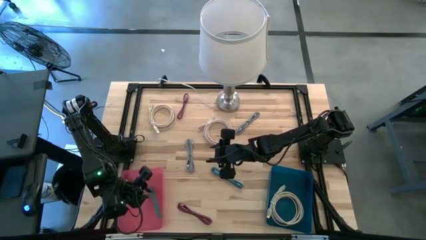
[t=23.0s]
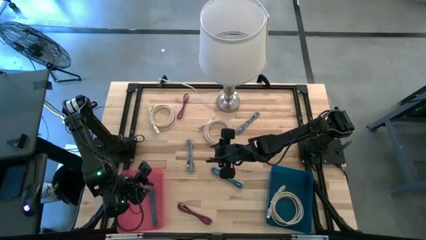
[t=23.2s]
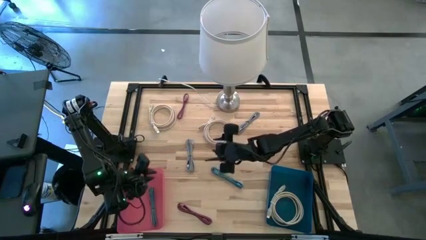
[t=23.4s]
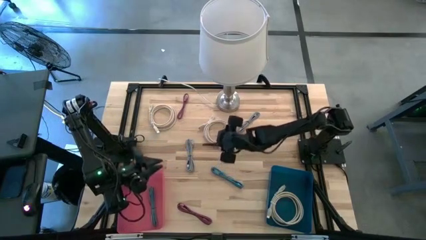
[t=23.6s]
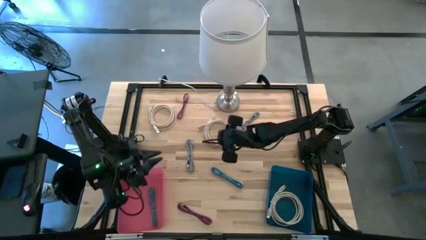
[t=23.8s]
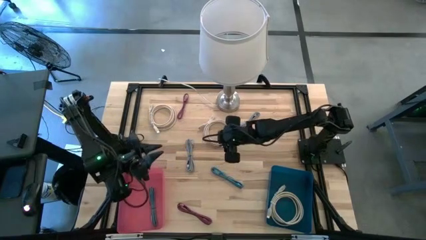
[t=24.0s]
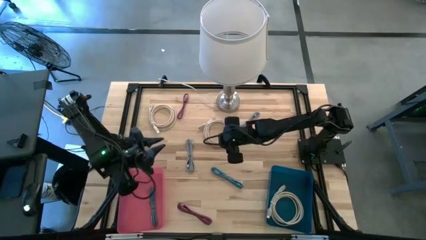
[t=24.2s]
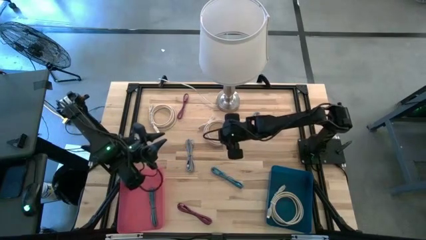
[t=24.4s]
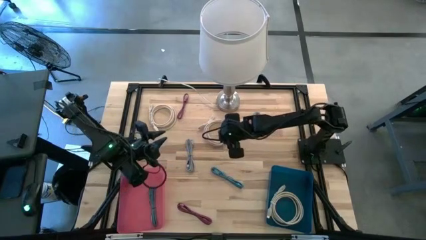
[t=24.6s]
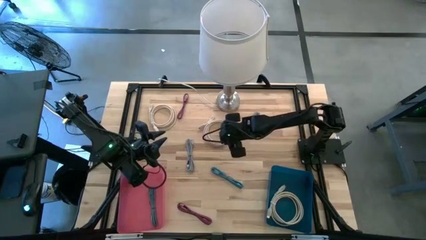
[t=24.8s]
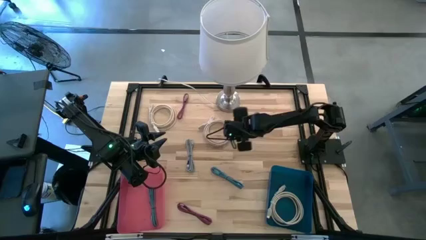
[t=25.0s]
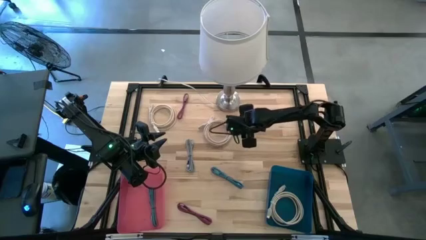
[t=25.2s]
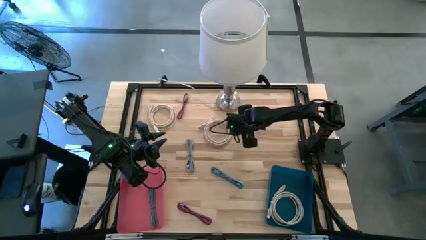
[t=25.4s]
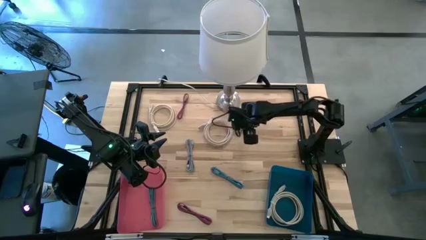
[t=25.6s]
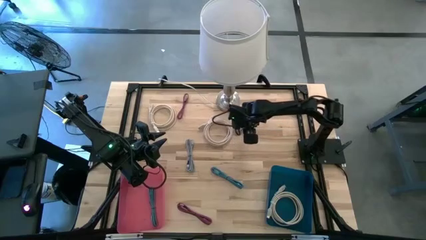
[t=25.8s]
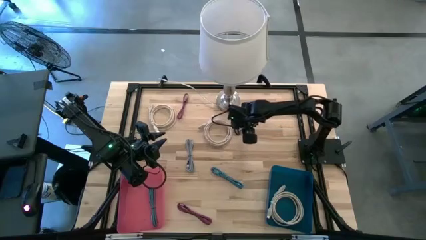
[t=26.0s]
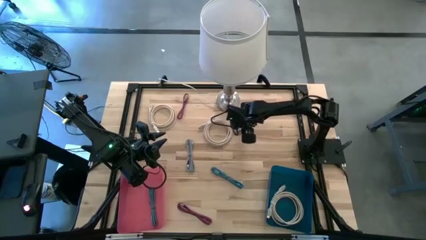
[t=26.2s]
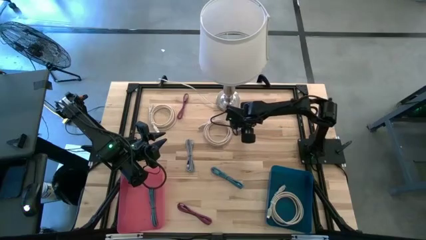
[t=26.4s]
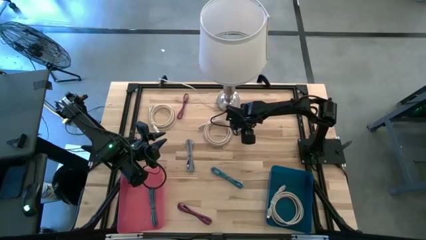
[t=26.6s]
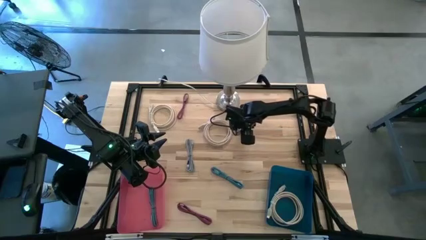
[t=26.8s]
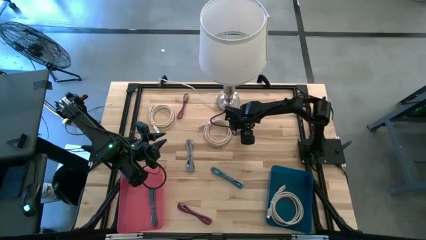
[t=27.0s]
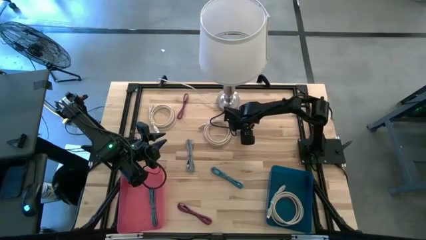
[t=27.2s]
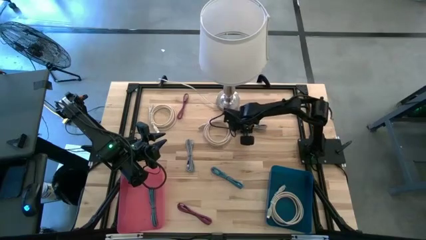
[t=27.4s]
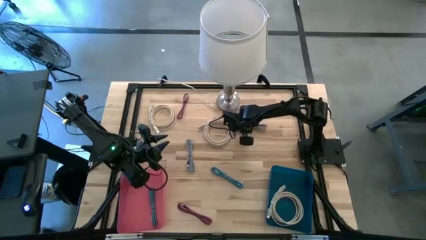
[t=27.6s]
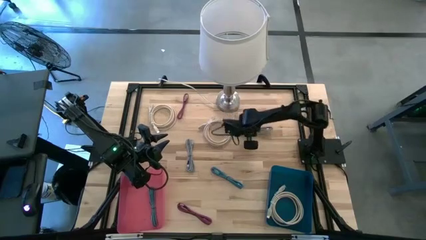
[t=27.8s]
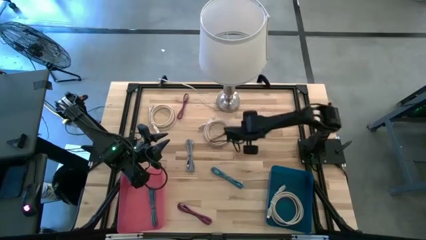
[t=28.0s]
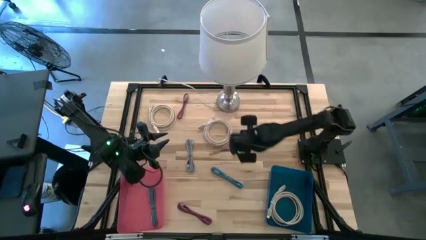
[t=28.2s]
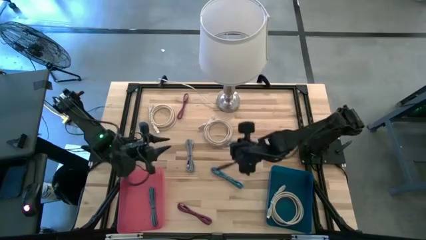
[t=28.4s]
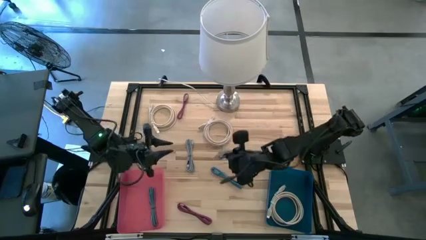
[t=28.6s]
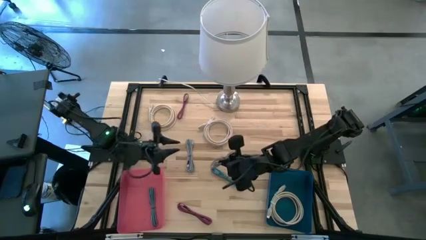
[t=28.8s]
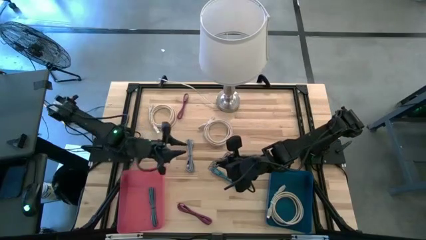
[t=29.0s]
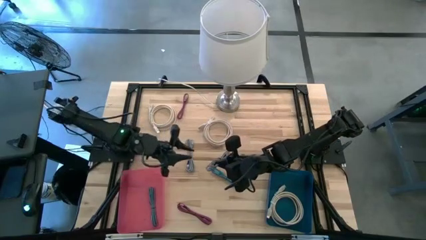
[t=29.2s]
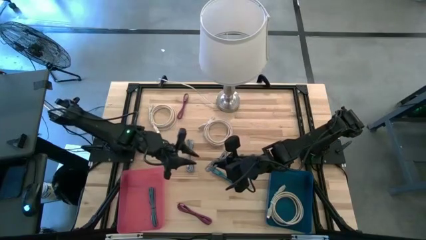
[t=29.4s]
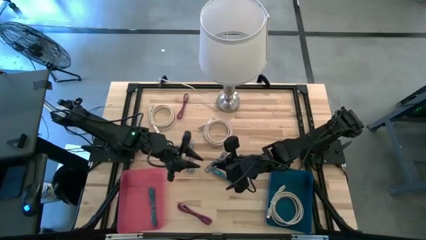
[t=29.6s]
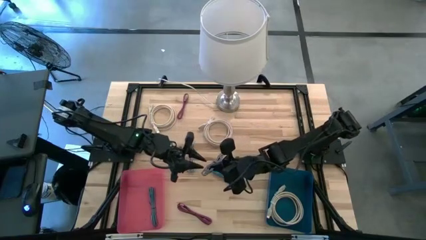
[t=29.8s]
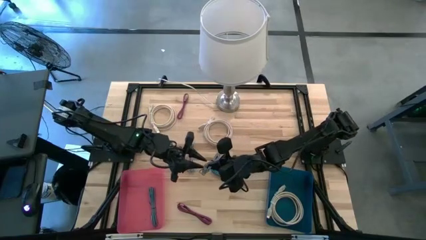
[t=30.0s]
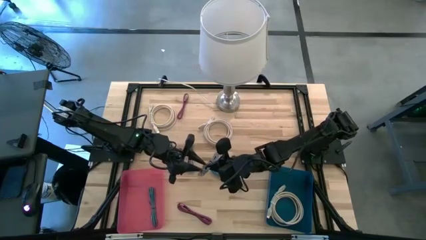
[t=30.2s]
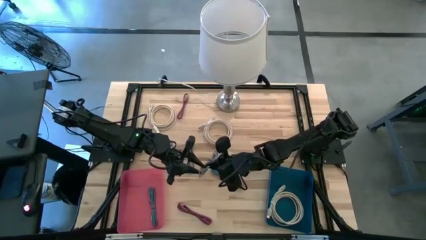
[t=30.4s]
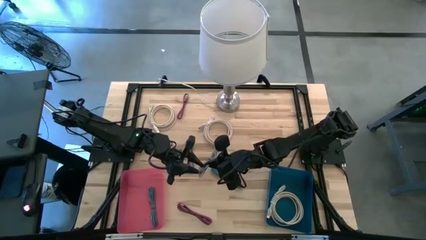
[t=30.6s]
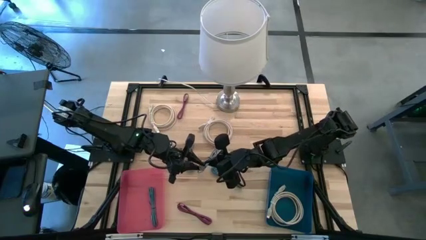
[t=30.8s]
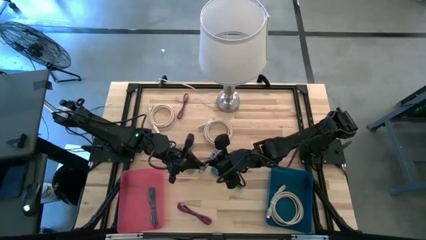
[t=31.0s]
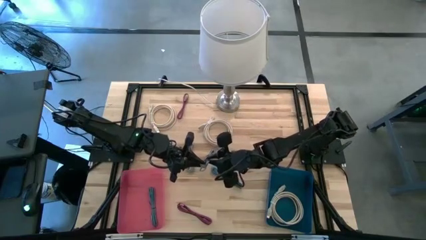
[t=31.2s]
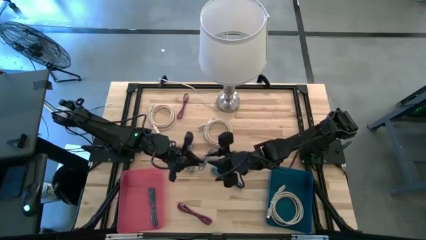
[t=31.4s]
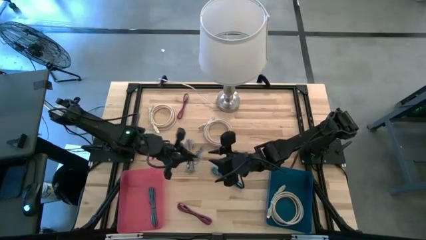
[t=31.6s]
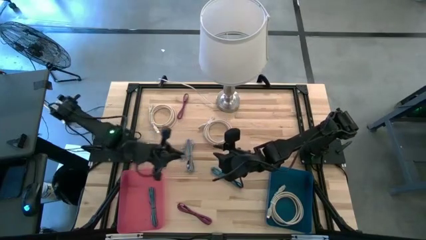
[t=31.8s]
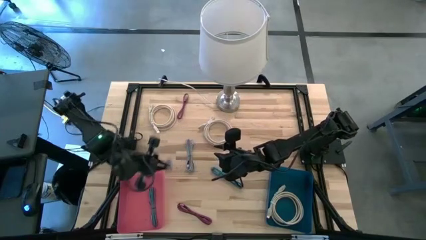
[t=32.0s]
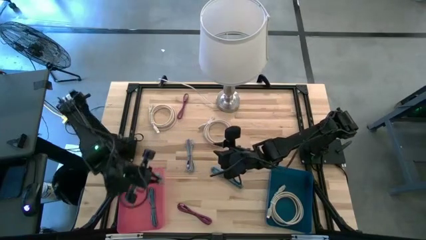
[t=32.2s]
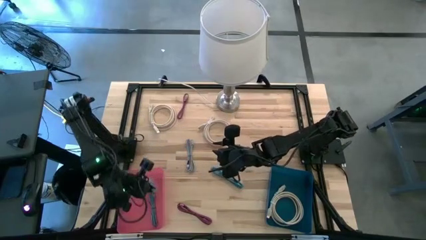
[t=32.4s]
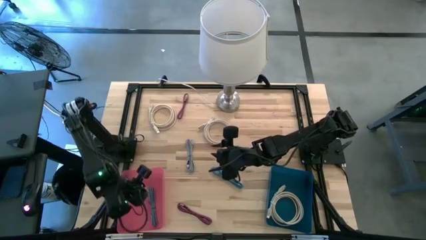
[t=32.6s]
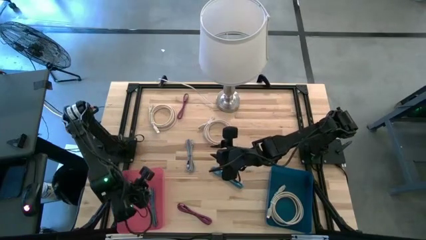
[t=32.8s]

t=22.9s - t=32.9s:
Task: Pick & Place USB Port
Put the right white and black USB cable into the pink bin

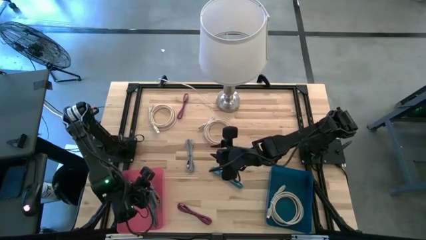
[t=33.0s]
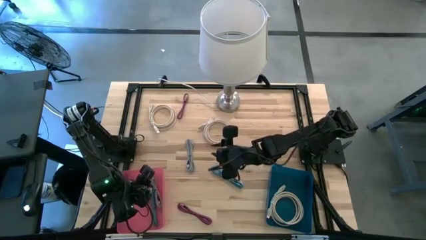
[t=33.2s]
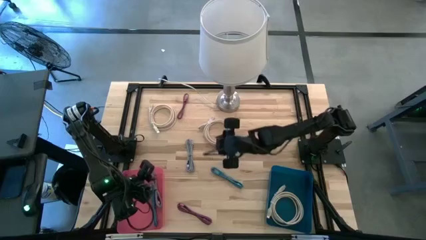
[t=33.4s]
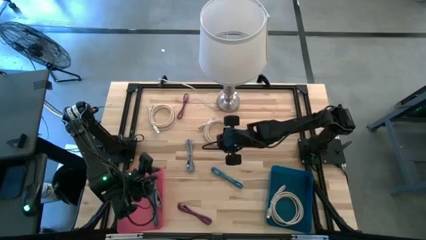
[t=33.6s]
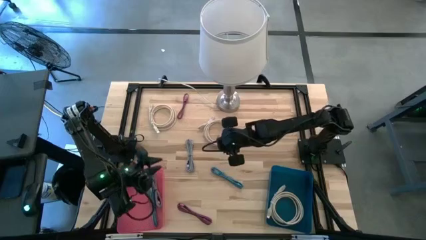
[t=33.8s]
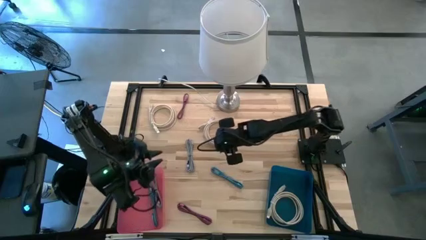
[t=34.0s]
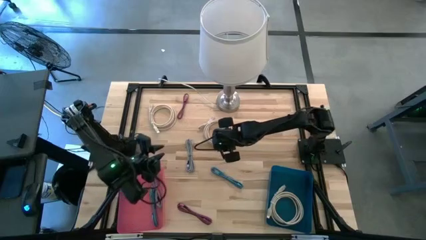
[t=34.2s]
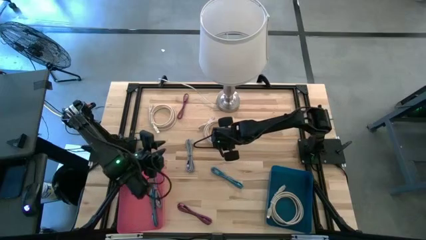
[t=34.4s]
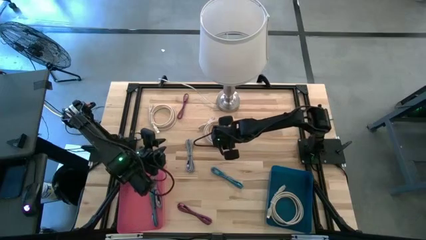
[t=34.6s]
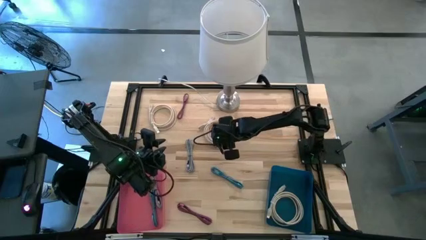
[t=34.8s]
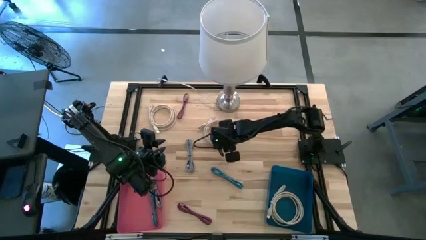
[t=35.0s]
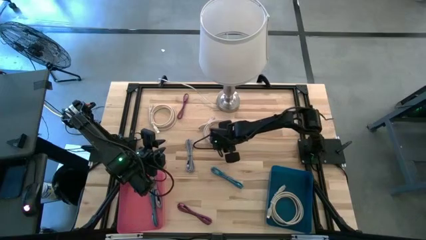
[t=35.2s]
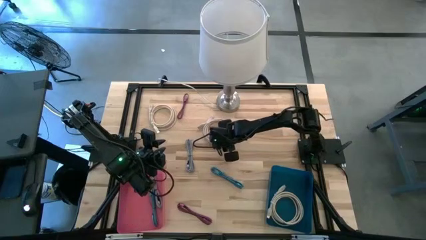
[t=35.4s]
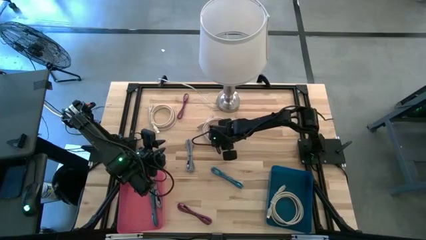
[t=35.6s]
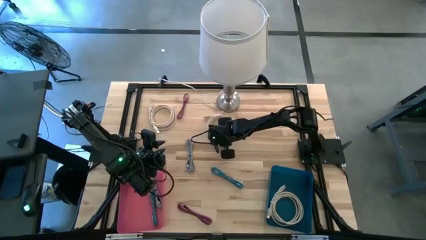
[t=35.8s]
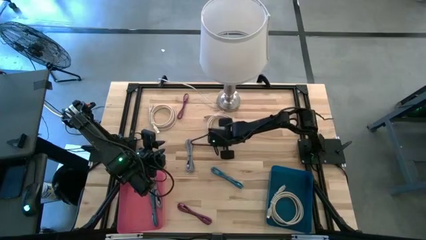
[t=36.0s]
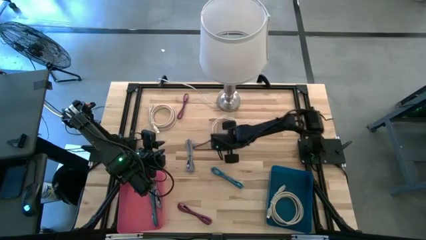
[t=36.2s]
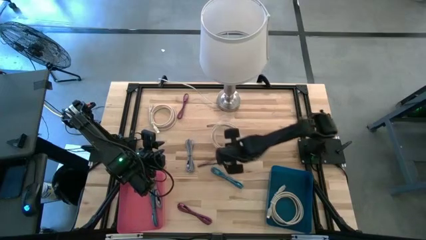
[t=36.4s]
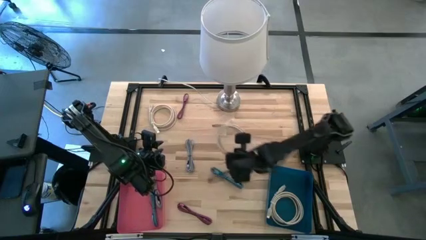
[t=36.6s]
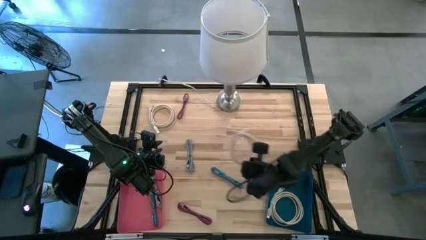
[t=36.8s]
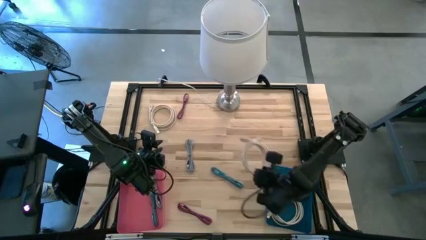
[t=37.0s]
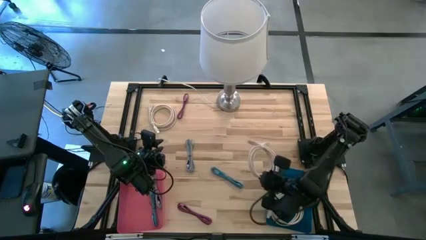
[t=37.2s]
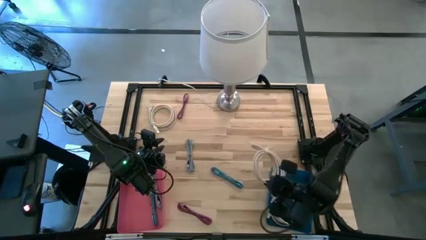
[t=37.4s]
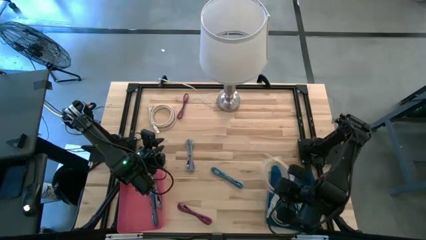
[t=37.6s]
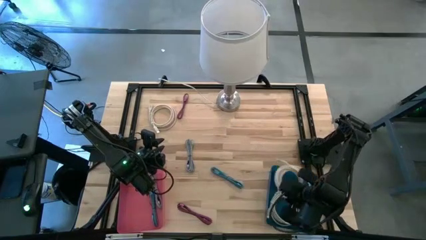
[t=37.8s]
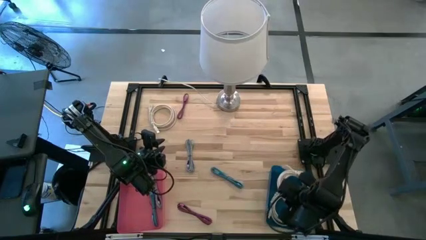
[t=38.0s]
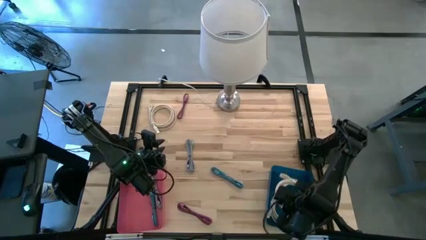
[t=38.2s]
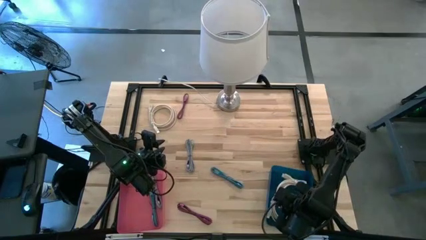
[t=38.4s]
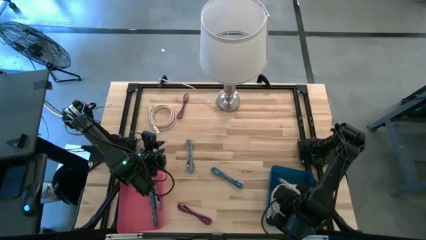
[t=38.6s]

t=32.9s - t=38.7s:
Put the right brown USB cable into the blue bin

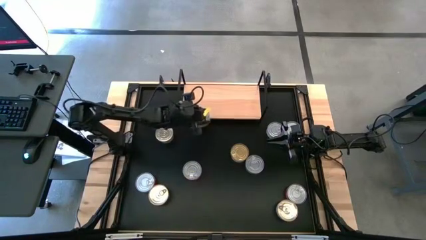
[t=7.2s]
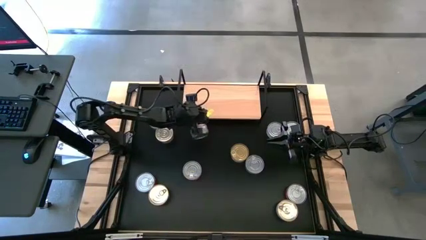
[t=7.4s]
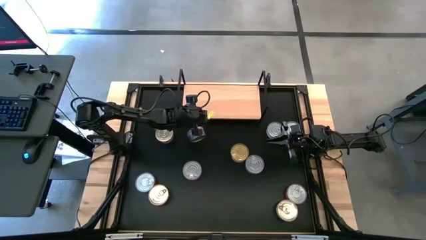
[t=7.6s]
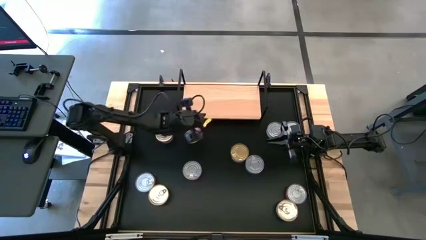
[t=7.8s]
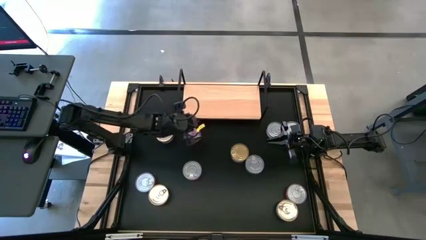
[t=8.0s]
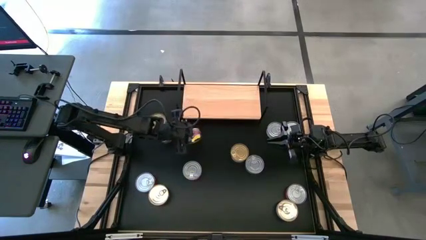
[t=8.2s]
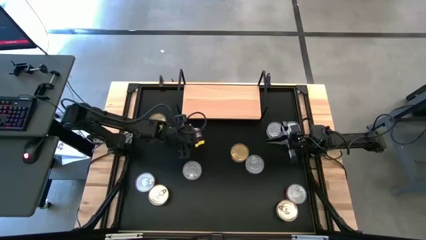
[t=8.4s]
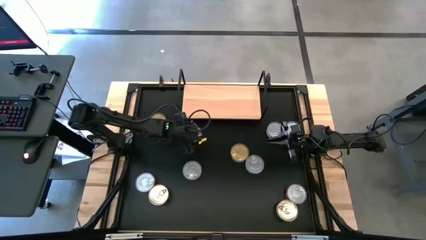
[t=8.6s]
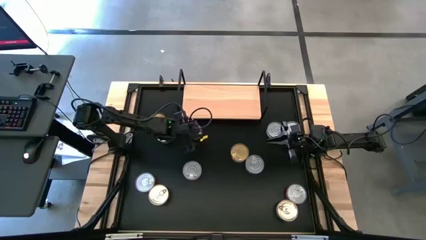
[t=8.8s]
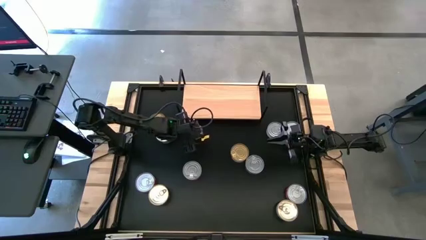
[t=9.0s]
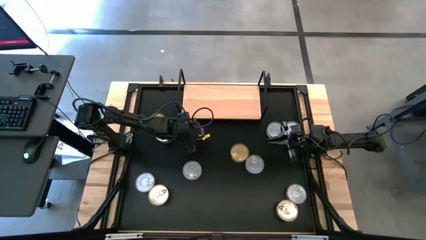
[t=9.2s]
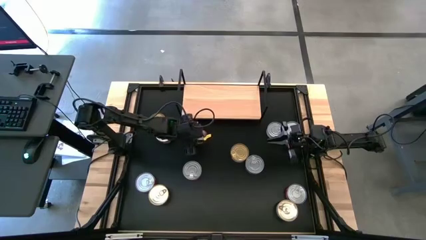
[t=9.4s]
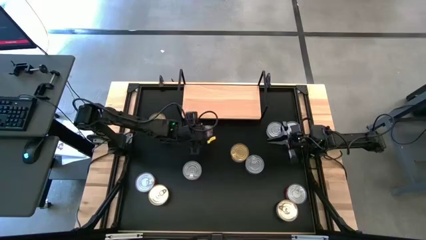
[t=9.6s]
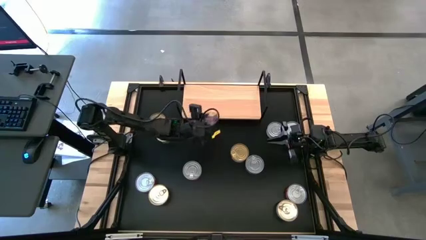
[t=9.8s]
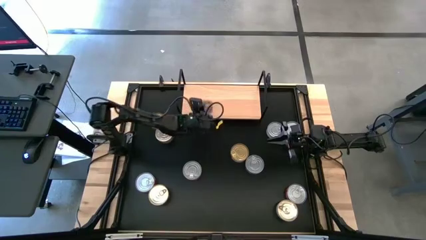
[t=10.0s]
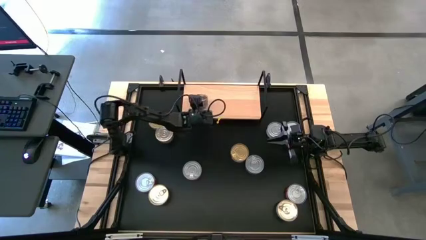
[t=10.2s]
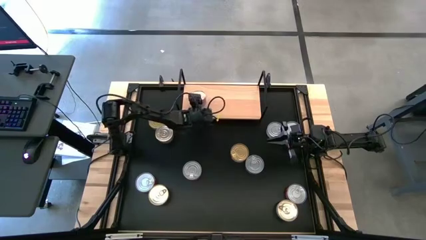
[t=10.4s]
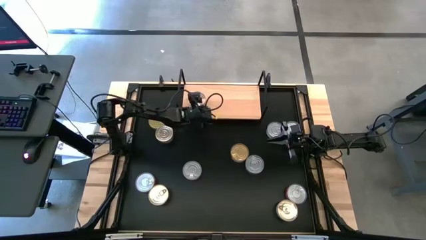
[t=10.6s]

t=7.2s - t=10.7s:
Task: Stack canned seafood by type on shelf
Put the center blue canned tuna on the shelf
